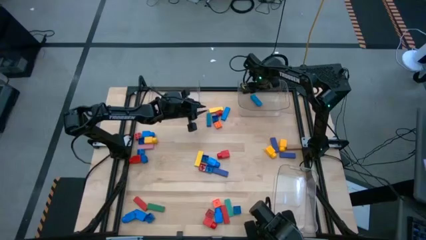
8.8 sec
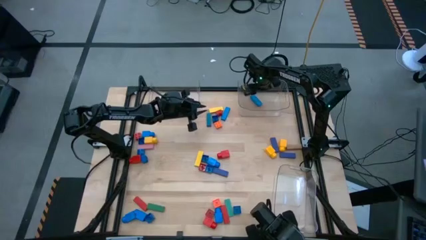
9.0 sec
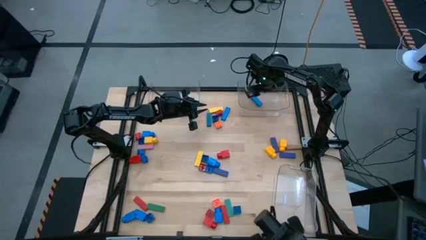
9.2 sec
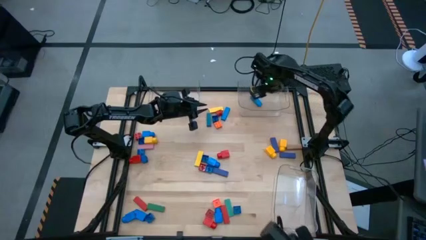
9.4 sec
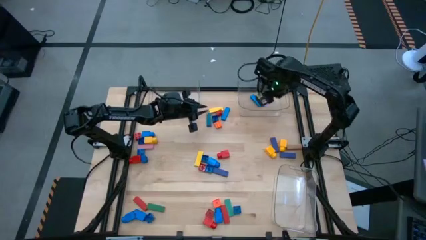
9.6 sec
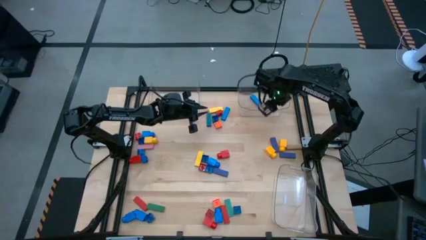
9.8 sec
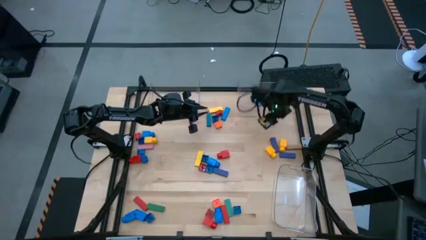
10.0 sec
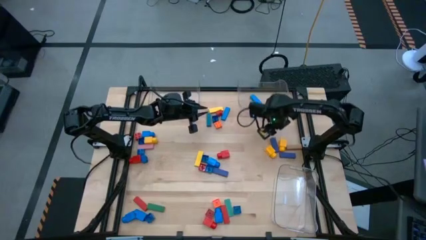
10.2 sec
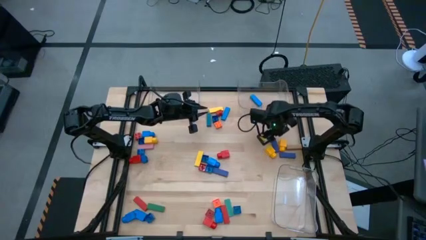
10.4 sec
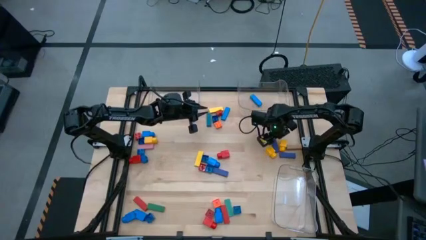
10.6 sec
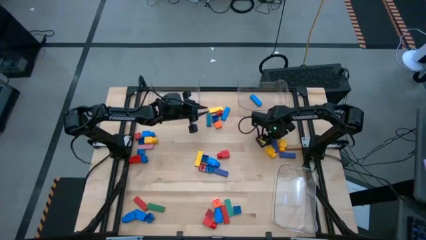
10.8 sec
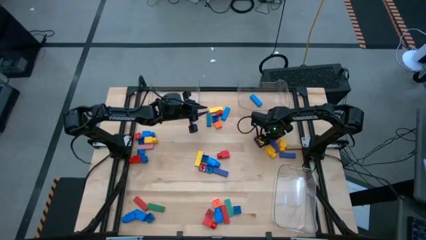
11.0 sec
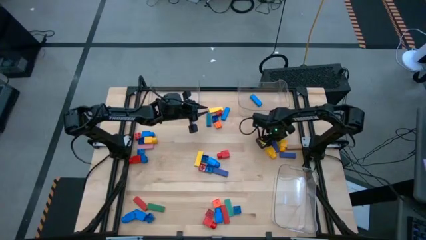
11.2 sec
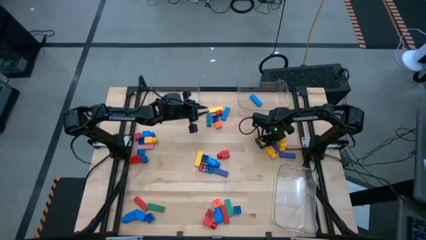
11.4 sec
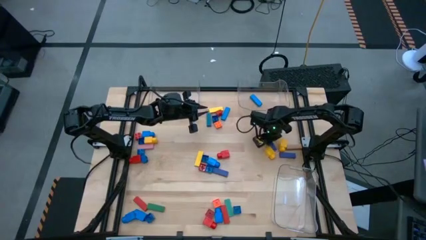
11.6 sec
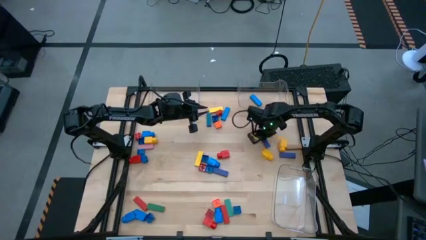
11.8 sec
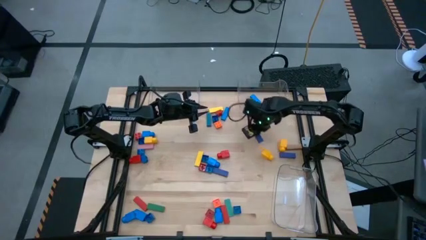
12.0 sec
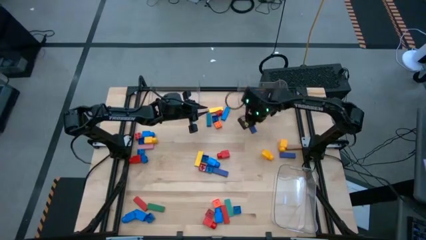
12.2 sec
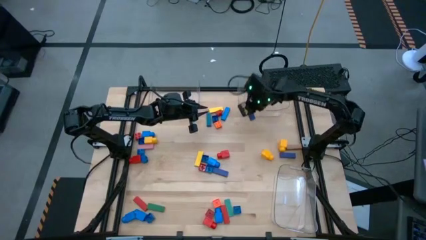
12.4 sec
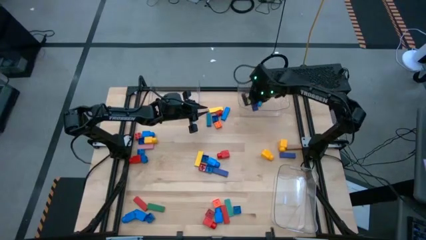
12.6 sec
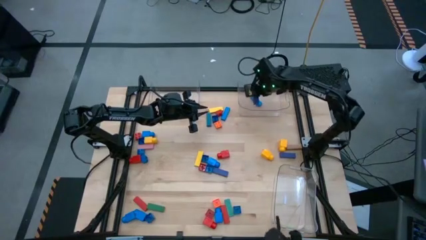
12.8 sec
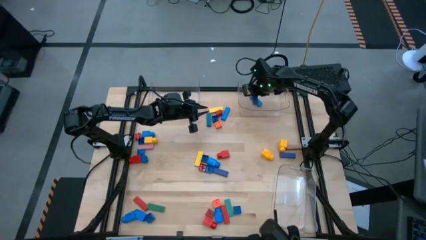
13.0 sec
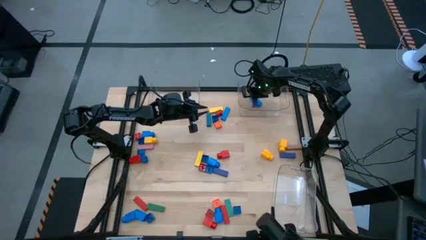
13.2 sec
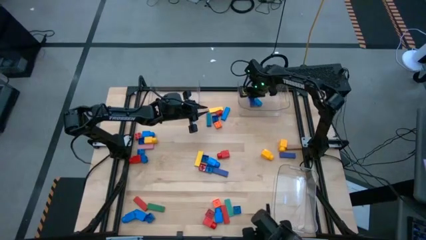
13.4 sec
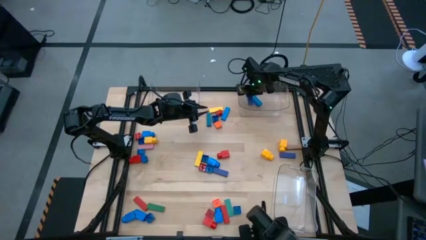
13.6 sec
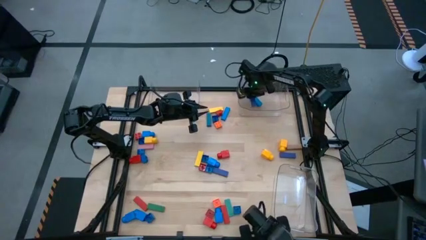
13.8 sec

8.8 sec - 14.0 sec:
Task: Sort blocks by size
Put the dark blue block into the top right transparent bin

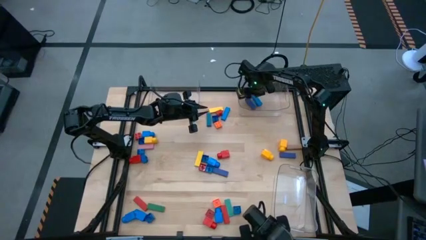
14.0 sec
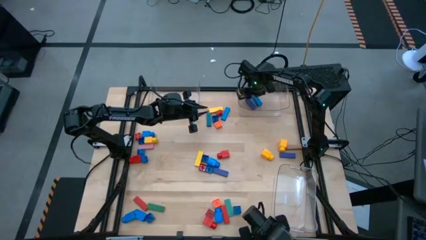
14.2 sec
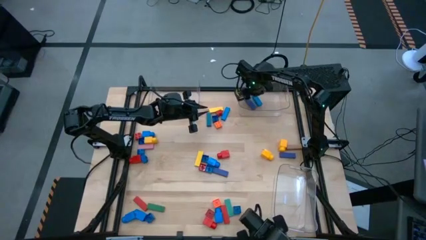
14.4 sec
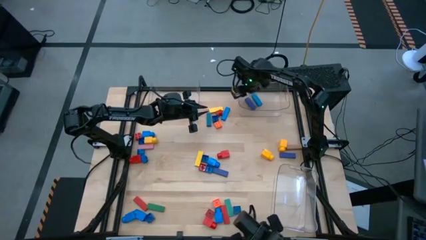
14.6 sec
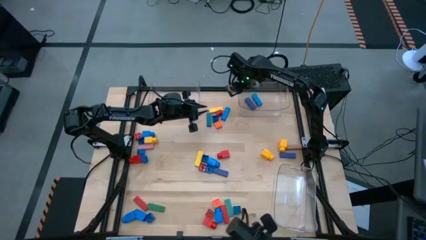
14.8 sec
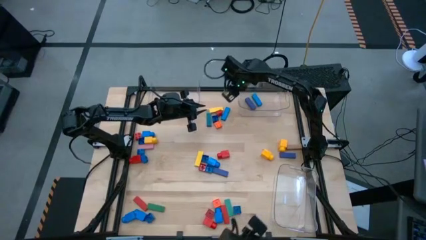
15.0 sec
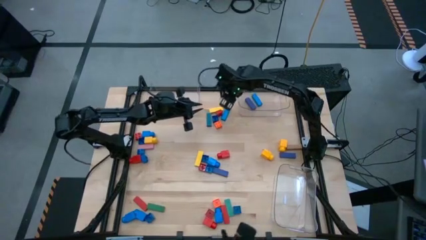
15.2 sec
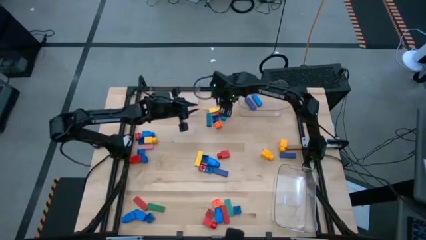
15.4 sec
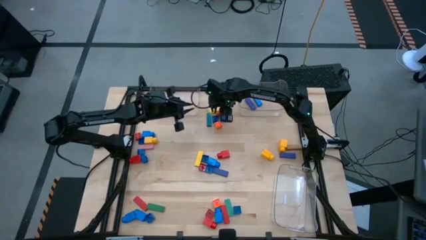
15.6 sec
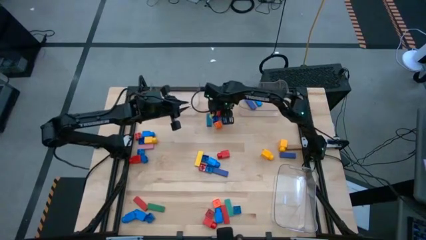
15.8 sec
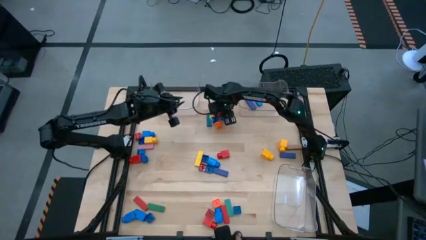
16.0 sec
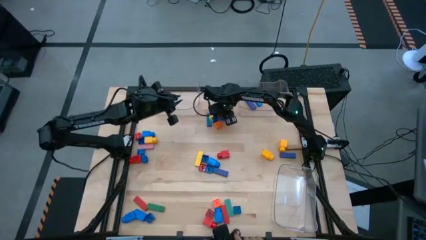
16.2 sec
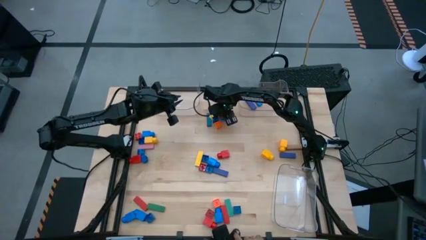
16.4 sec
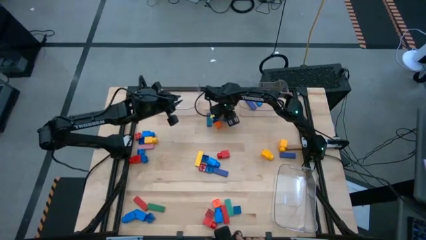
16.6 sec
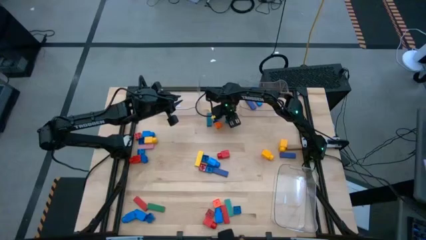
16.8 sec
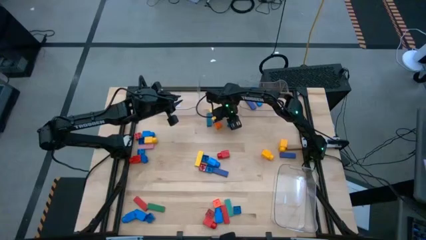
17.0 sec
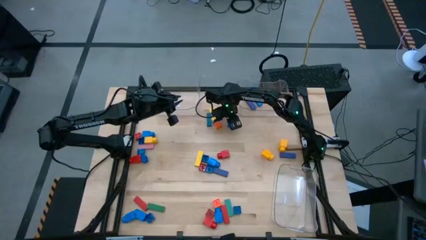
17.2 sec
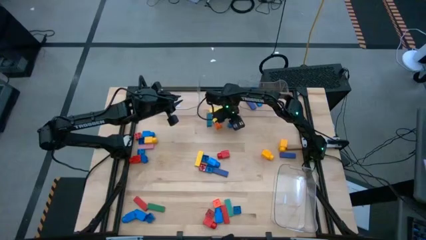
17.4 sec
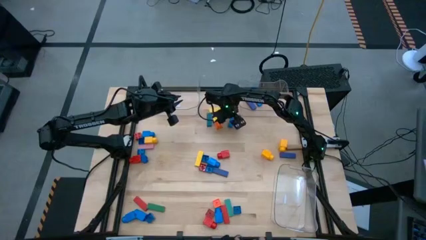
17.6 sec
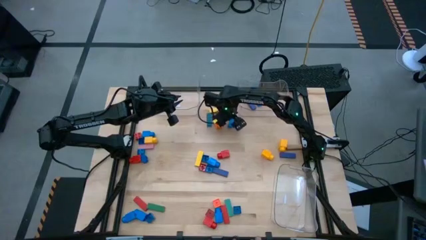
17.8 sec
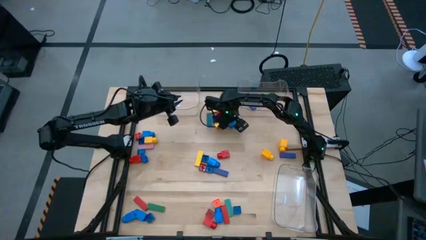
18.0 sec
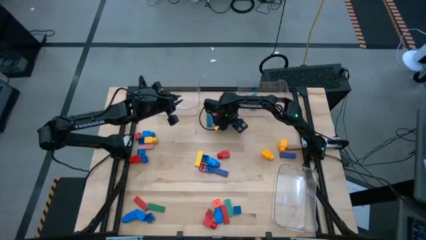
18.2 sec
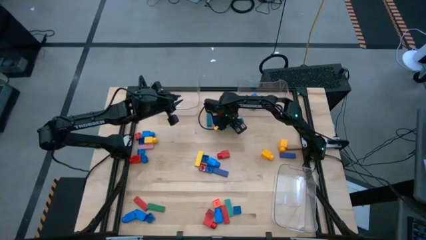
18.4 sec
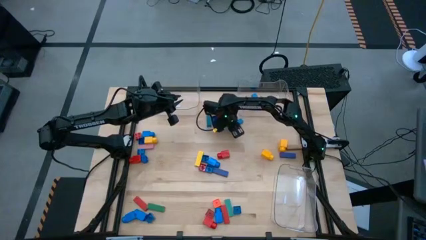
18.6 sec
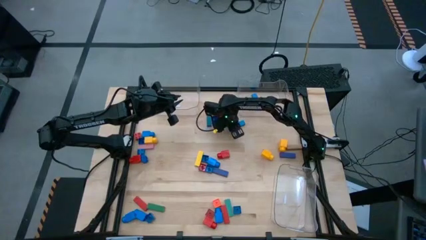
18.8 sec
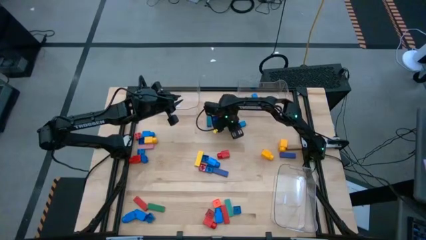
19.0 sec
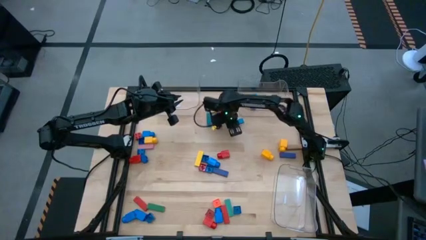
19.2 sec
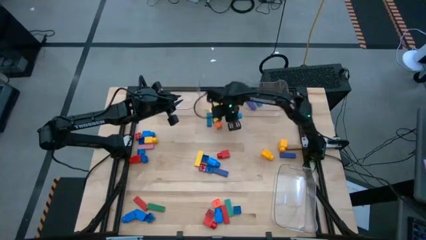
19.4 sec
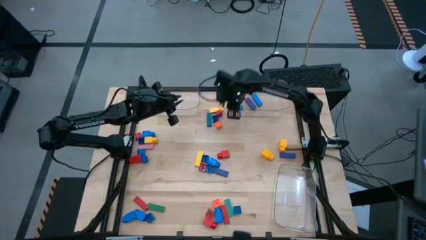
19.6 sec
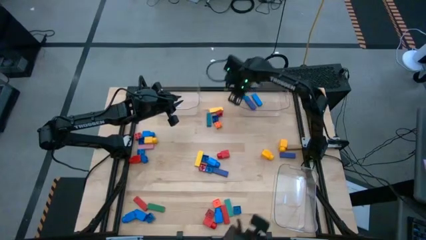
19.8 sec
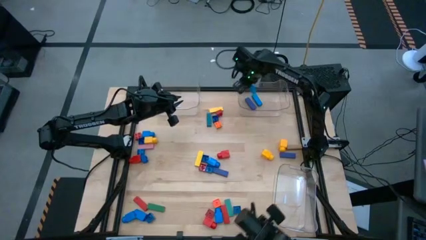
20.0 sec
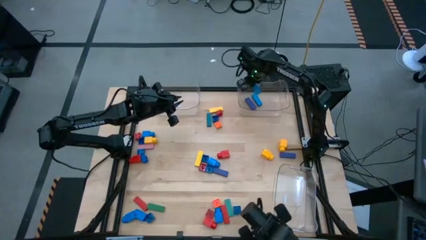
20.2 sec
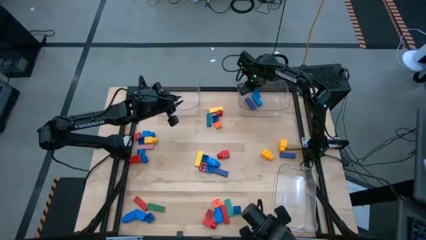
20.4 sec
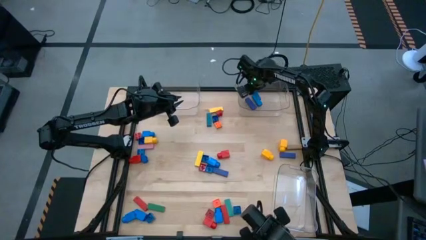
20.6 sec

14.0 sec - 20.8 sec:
Put the blue block into the top right transparent bin

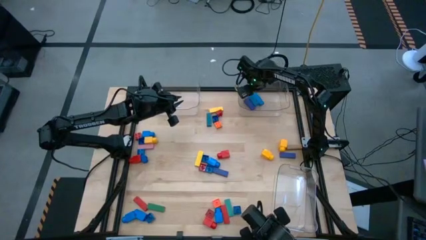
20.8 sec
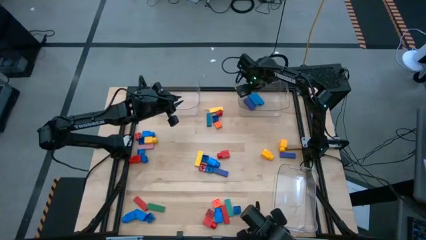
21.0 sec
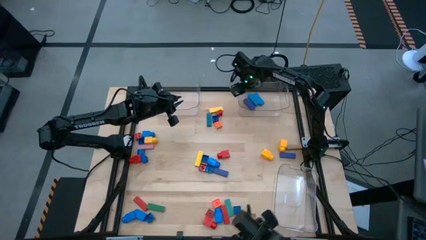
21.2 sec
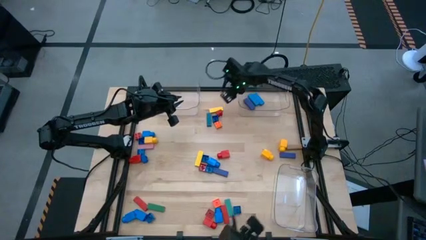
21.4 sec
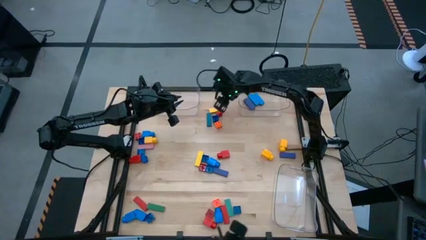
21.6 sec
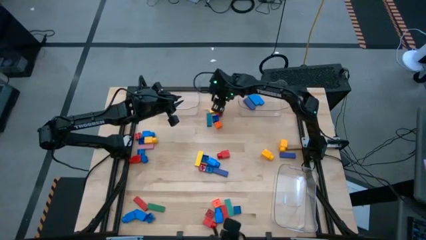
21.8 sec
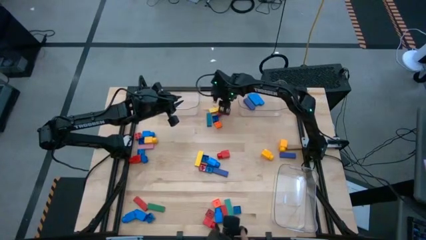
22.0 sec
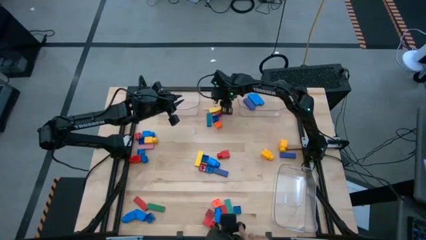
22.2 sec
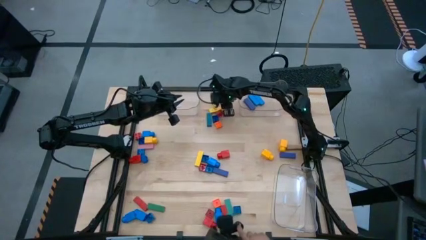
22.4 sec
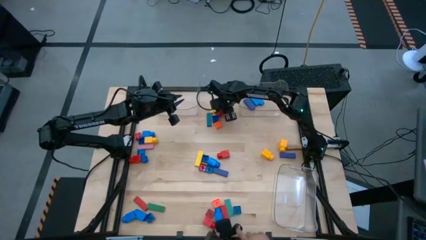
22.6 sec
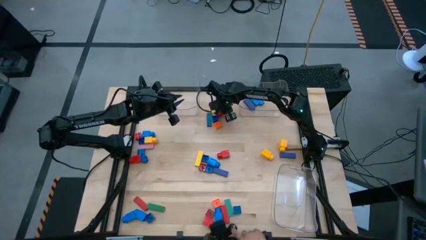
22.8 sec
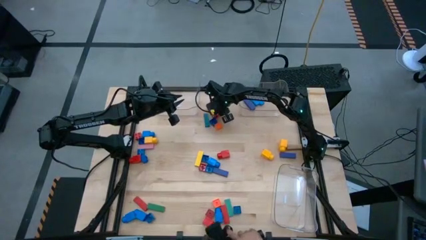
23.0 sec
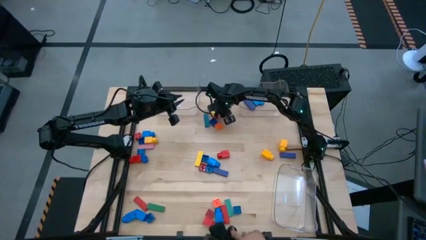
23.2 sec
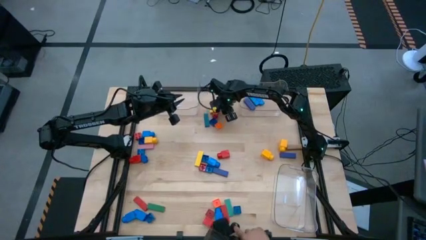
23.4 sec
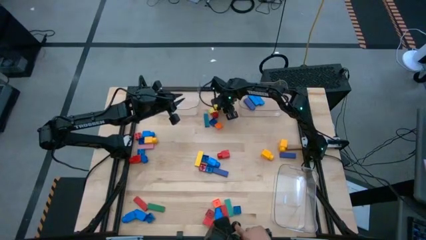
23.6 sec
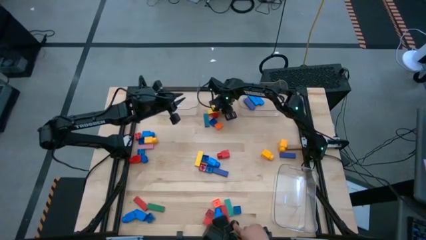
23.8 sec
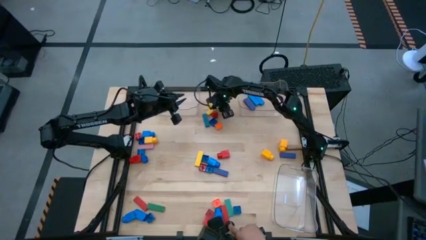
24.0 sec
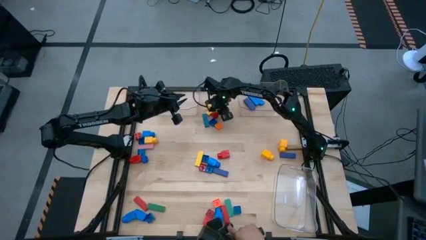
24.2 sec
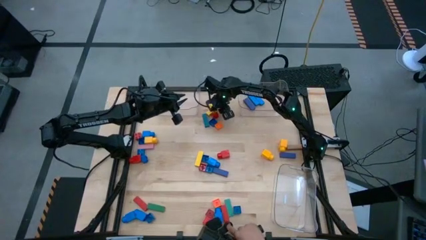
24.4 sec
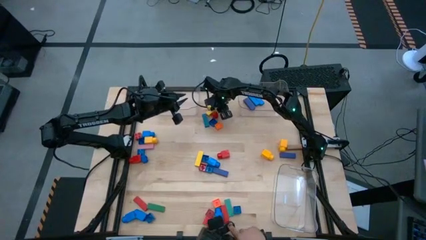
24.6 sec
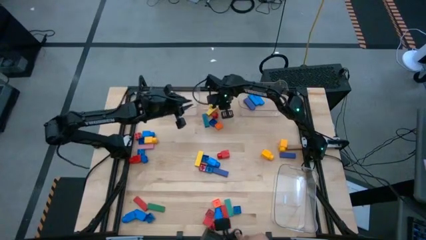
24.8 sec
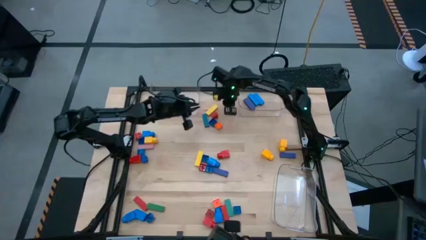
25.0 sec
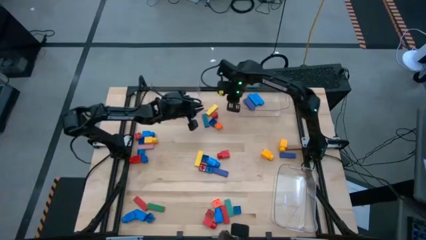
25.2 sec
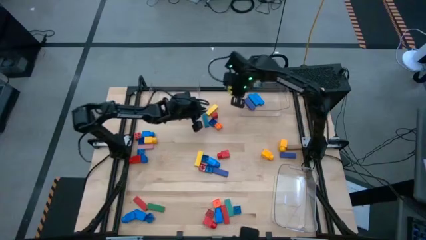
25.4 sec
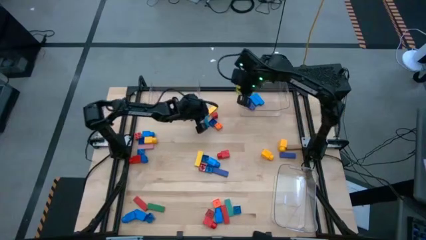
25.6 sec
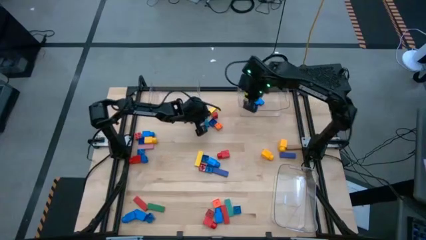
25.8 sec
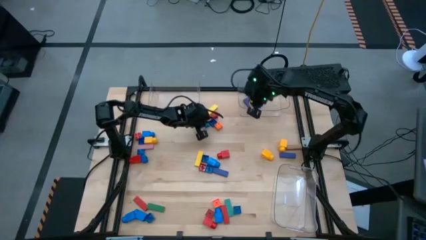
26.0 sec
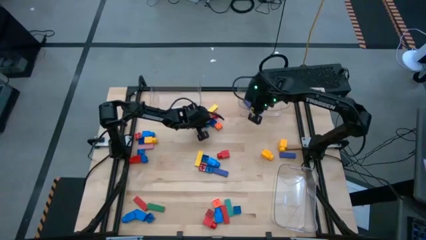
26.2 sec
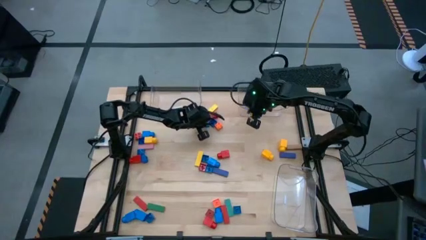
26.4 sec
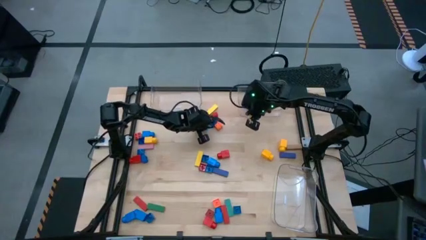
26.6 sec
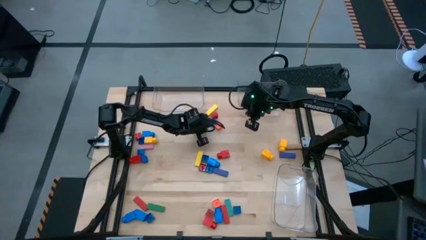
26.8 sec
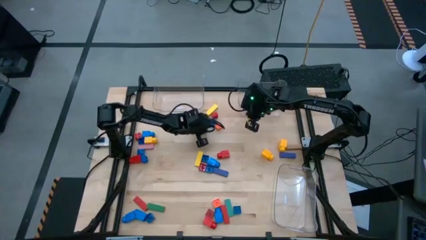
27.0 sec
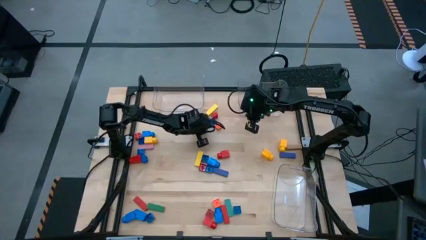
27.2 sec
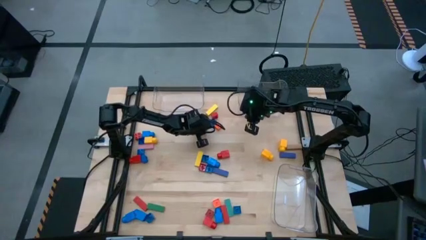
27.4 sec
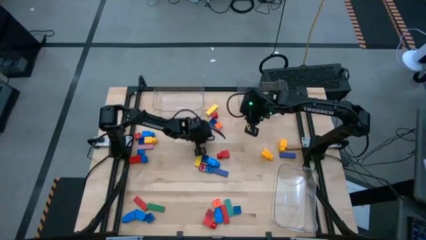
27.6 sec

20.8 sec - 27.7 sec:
Put the light blue block into the top right transparent bin
